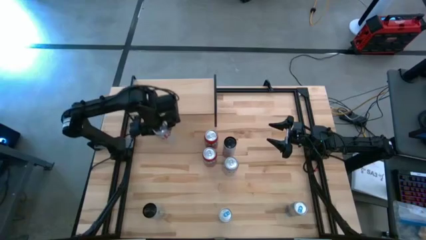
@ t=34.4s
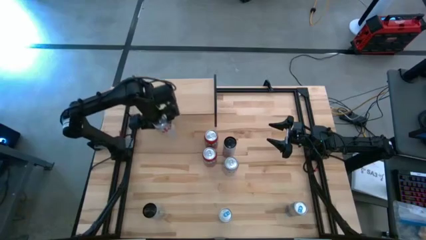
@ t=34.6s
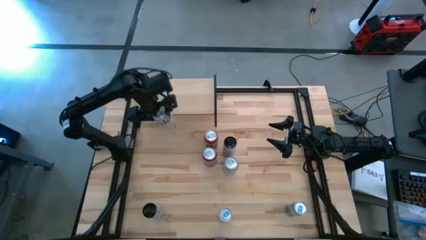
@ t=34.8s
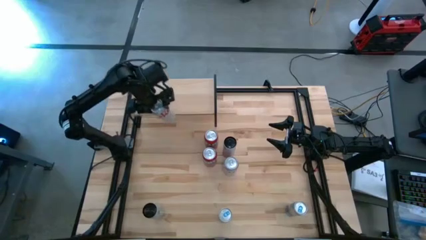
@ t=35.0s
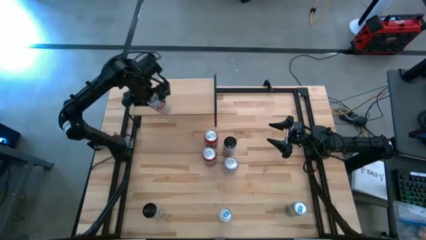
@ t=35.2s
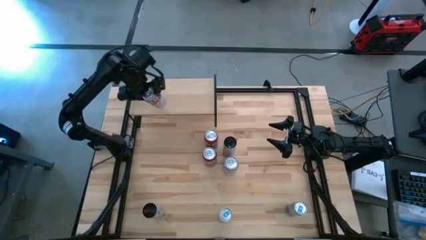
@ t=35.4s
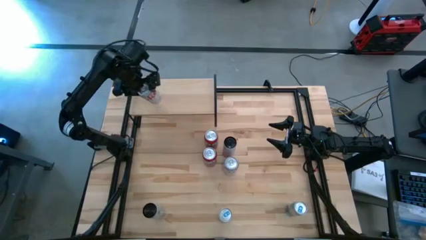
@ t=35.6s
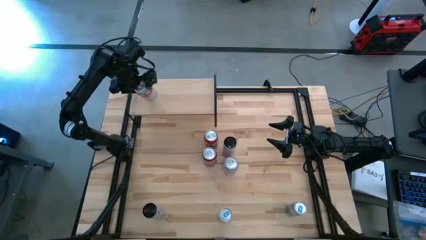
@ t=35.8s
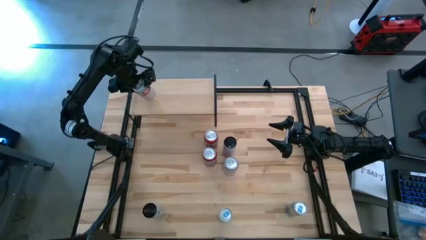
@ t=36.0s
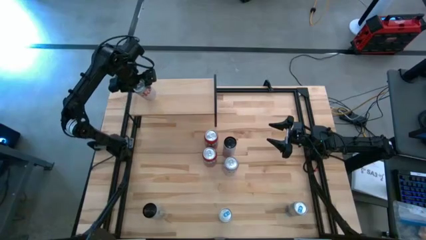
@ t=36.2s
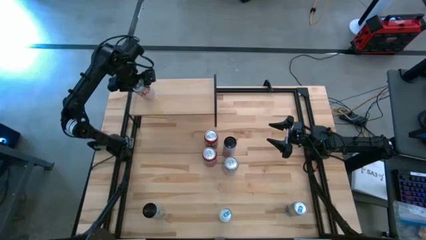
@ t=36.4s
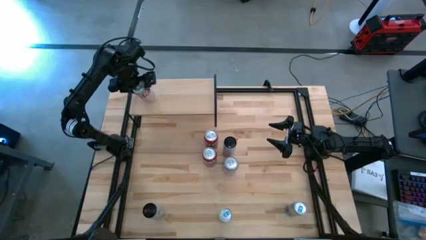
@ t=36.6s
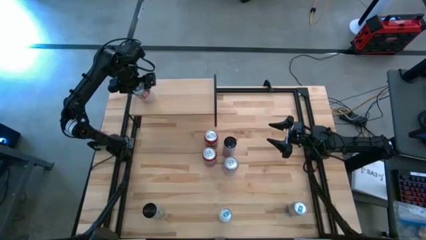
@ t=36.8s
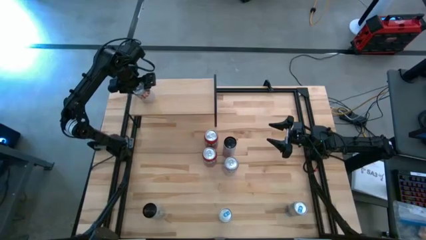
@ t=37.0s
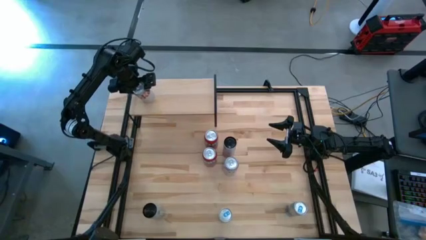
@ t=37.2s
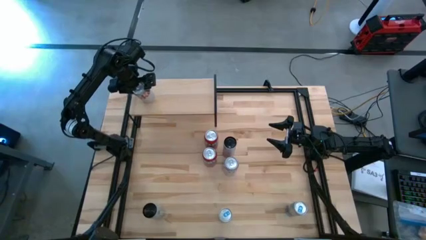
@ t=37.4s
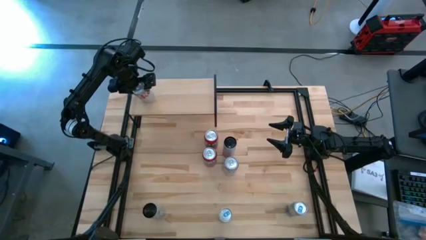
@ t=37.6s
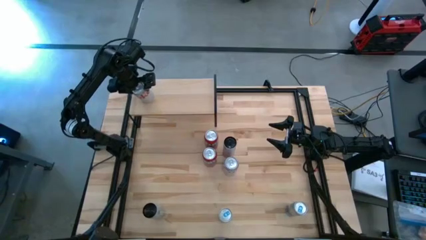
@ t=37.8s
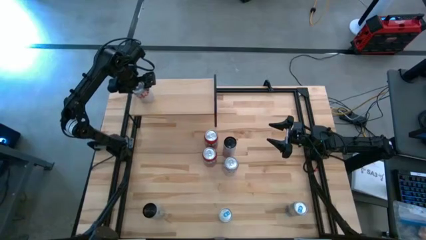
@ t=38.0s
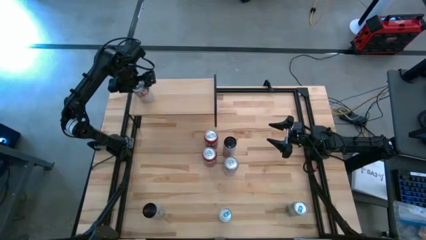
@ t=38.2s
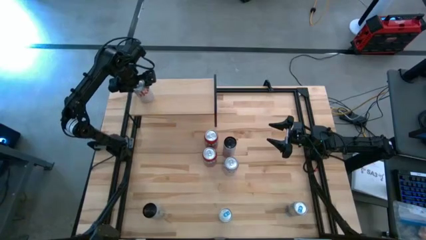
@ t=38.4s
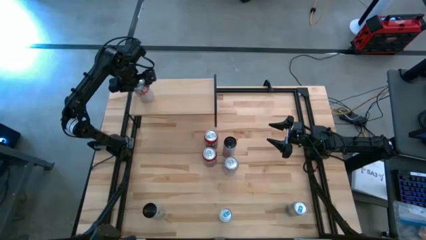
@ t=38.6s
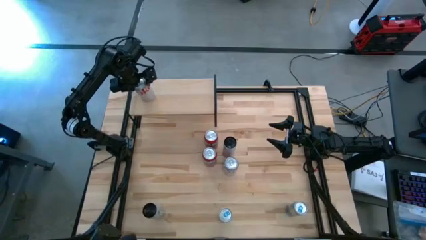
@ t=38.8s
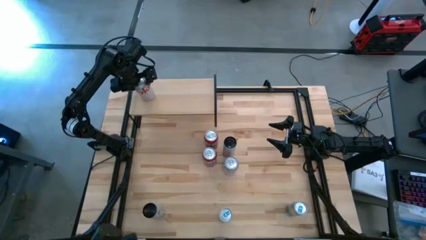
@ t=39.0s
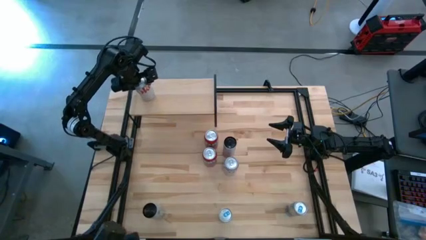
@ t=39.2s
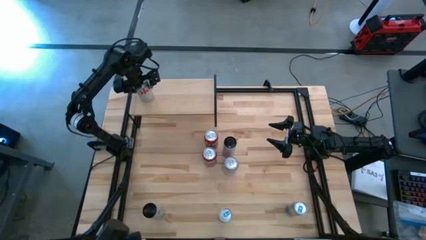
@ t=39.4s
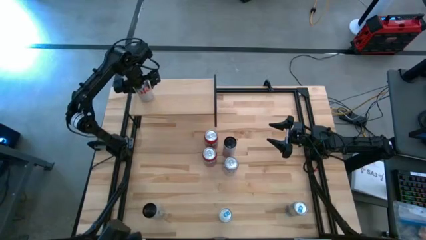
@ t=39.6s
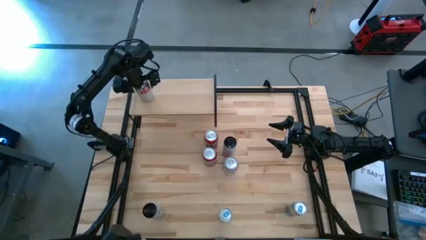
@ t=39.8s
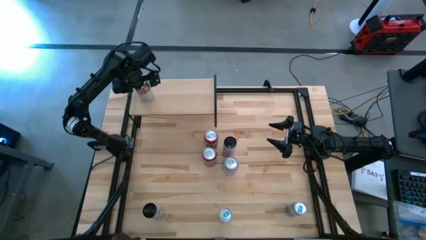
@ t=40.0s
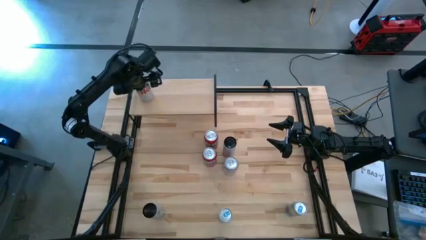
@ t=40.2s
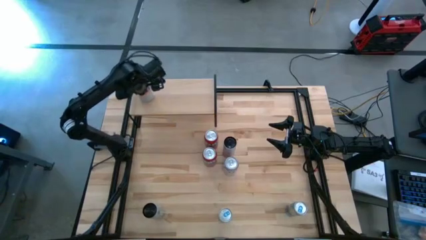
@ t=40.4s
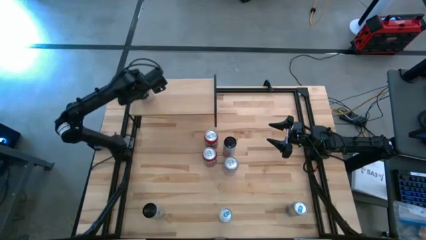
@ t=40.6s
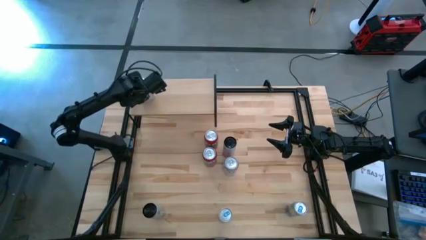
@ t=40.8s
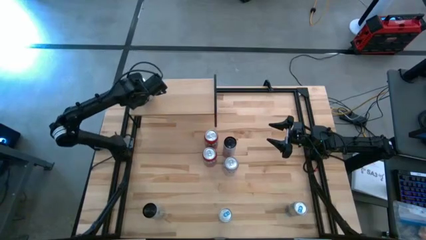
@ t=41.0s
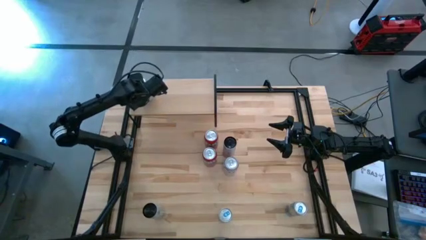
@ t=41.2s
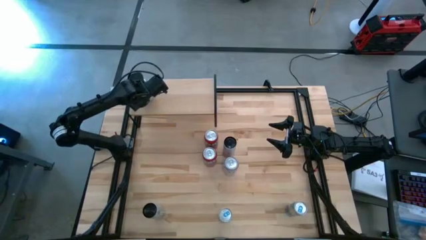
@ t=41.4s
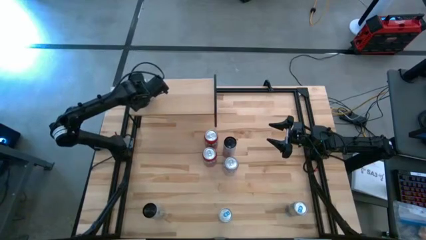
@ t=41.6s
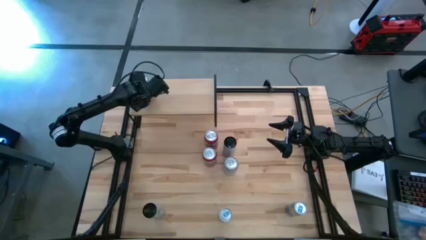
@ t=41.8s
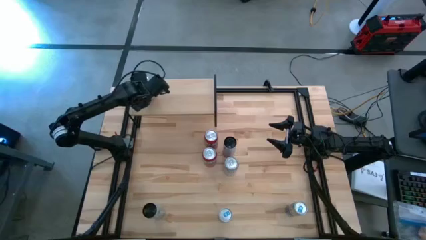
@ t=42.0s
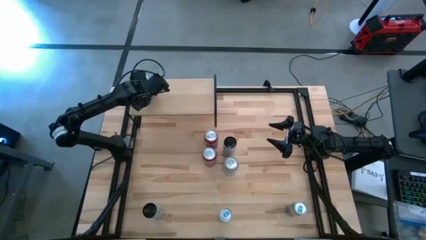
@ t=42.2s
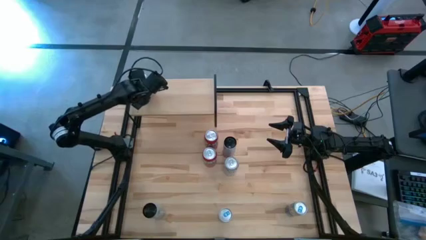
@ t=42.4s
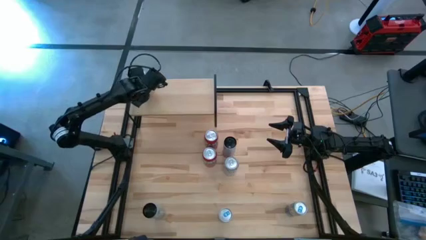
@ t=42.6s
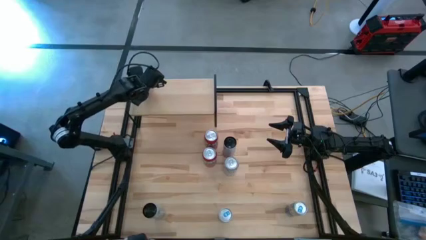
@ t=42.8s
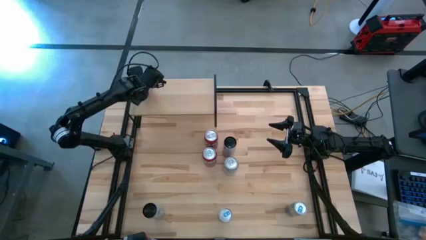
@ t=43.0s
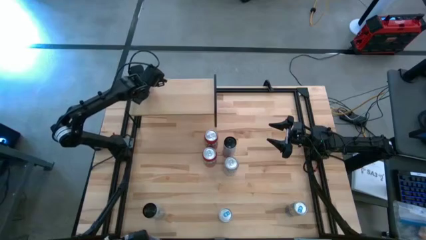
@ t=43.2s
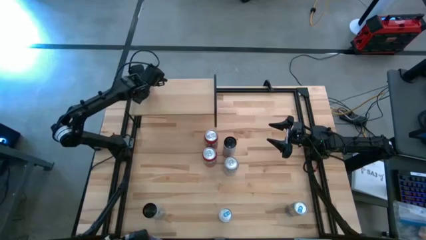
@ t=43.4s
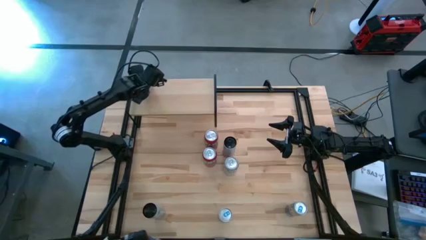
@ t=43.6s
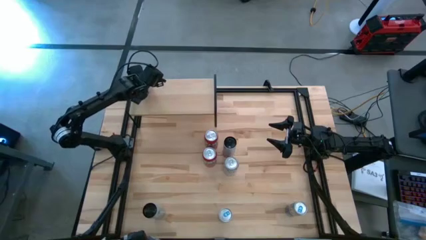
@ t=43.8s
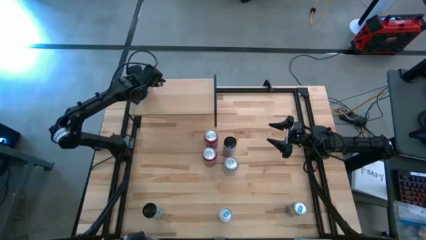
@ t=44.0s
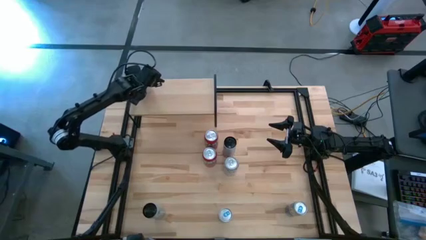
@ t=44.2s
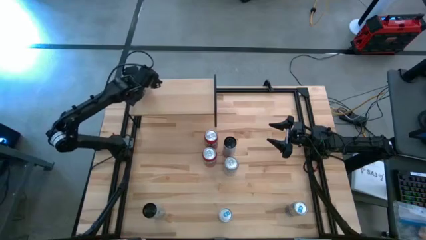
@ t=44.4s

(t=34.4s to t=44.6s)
Task: Place canned beverage on shelf
Put the left red-silver soda can on the shelf

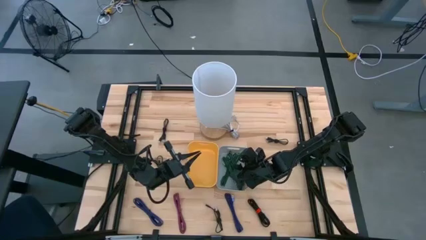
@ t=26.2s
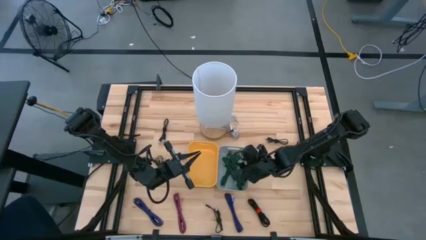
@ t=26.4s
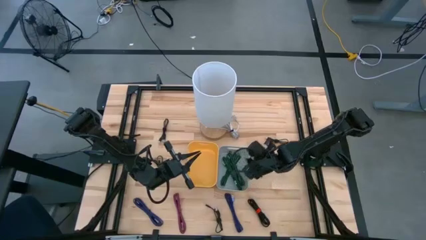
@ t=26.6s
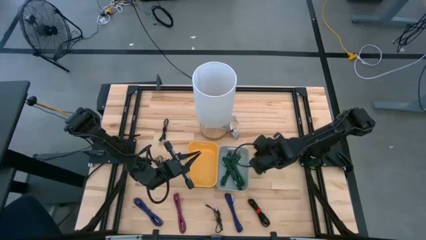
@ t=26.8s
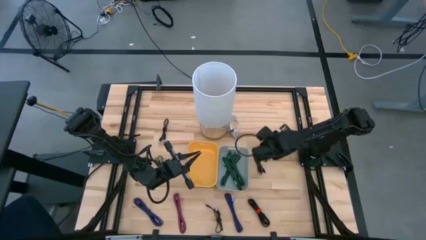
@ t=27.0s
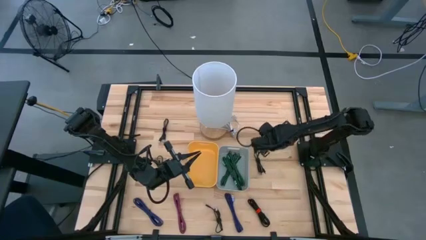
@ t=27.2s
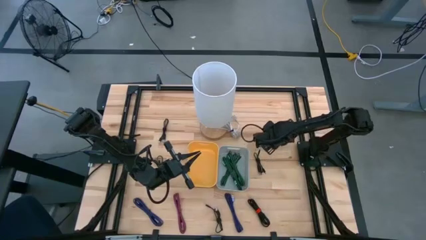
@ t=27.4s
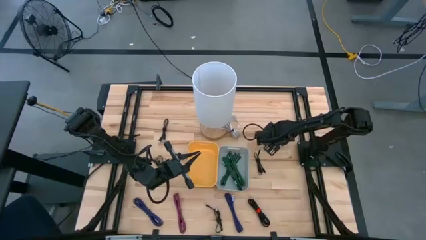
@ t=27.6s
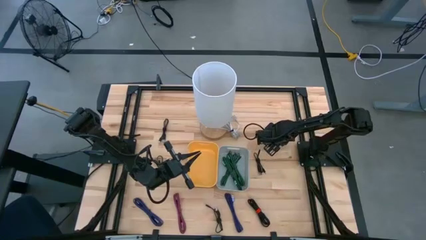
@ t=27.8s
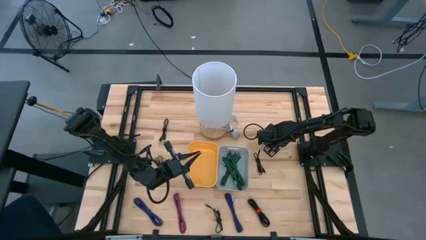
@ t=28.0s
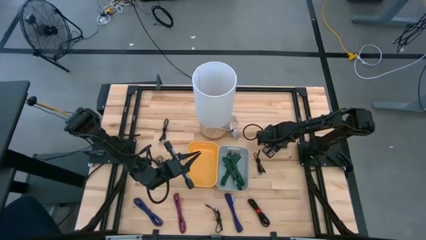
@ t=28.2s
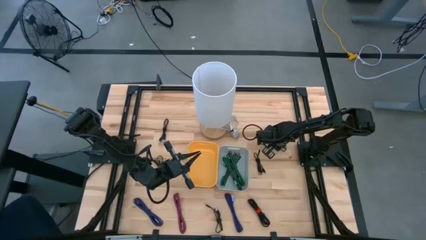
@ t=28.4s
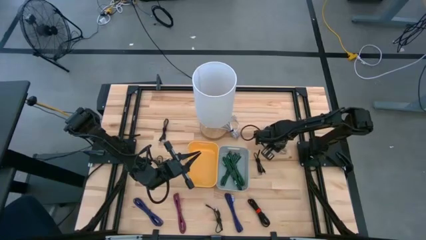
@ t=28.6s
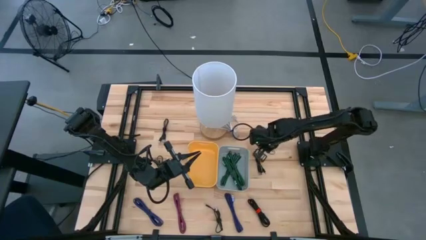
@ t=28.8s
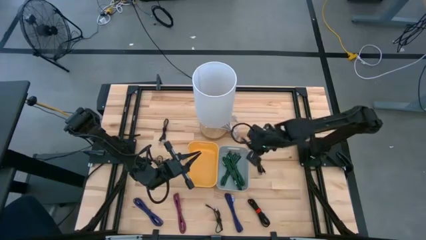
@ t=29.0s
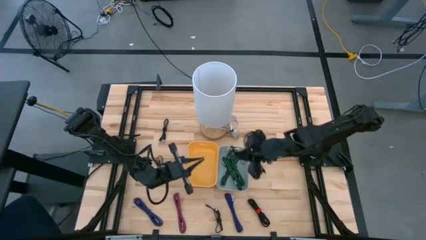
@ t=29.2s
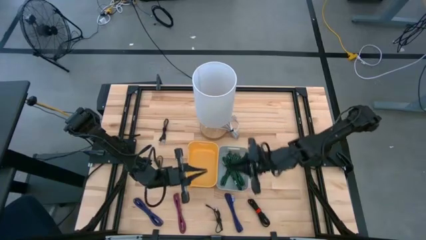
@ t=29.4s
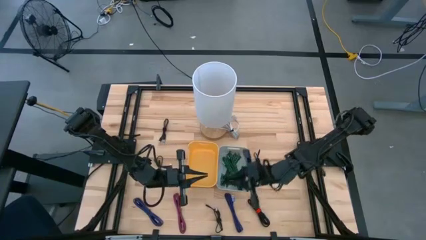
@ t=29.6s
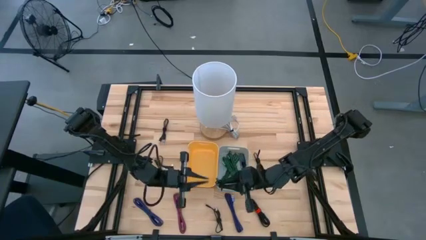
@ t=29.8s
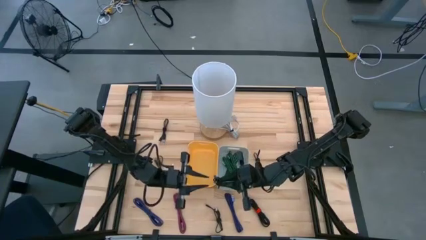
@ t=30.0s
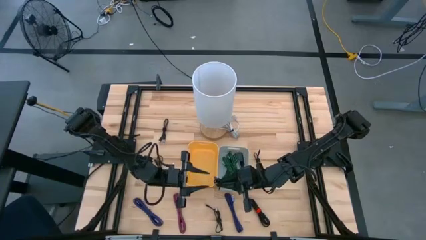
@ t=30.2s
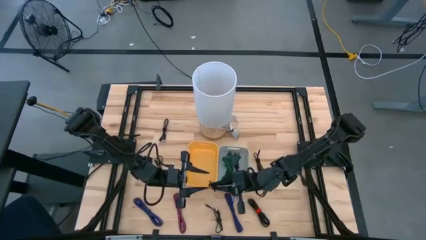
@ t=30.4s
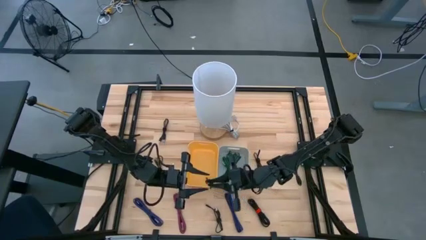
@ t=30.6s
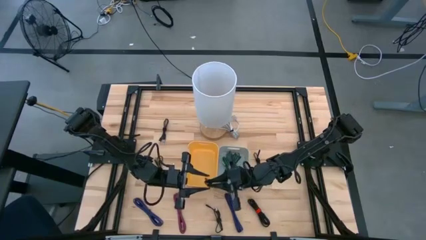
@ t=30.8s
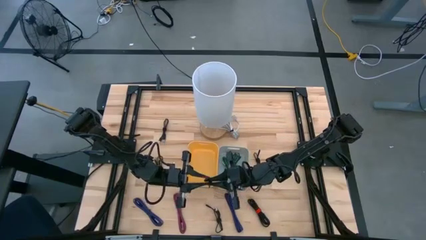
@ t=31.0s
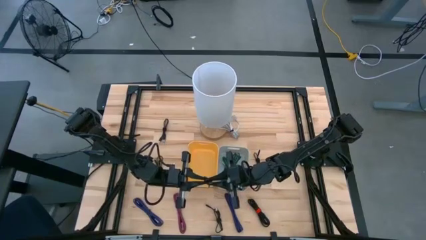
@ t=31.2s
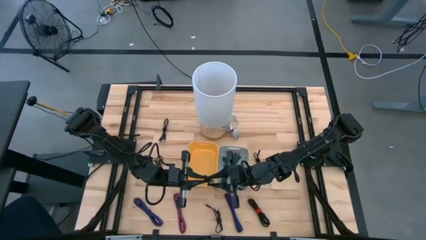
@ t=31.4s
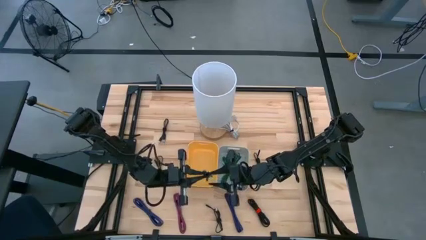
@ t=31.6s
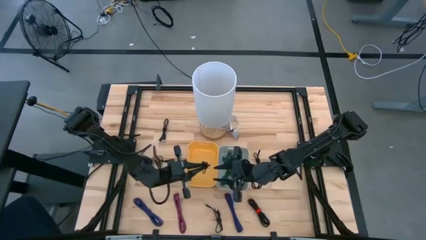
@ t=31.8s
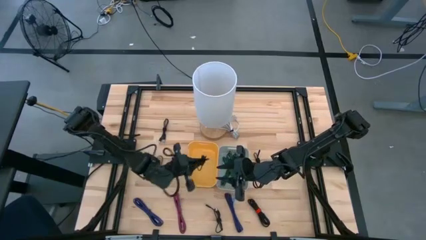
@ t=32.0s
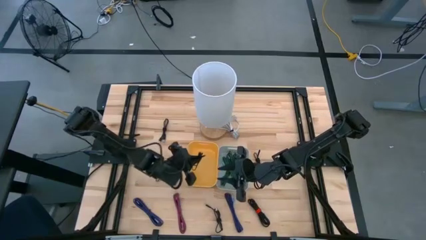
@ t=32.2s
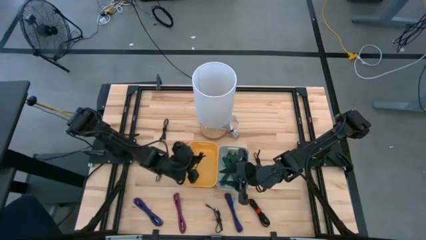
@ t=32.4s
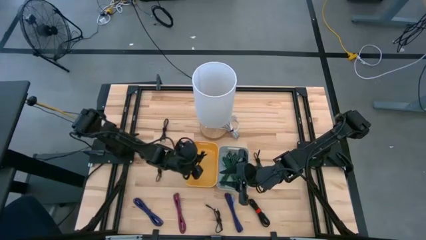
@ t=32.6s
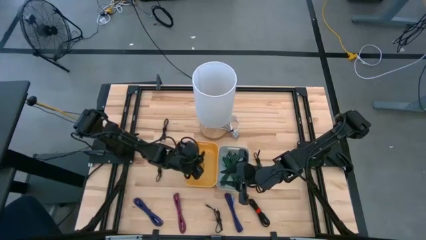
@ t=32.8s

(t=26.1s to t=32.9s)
Task: Pick & Place USB Port
Put the black charger cable into the yellow bin
